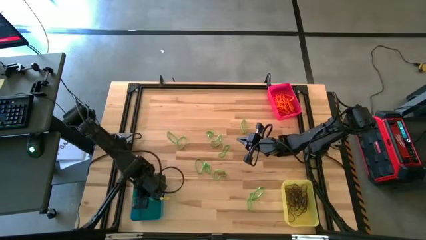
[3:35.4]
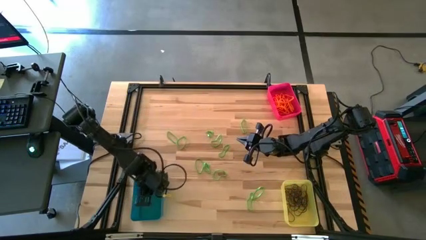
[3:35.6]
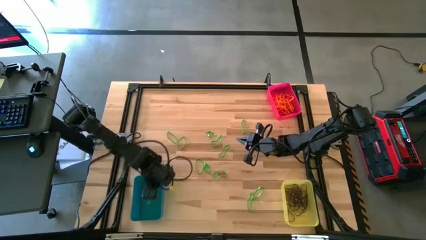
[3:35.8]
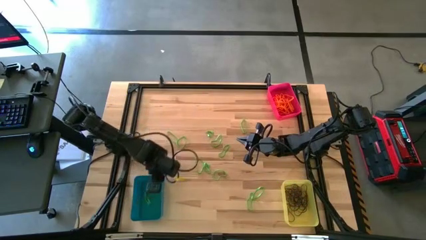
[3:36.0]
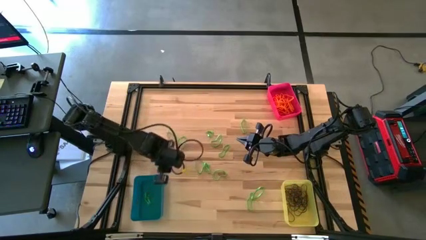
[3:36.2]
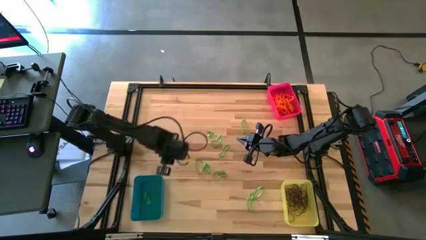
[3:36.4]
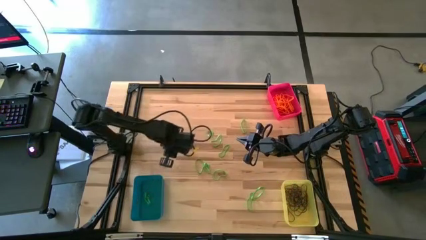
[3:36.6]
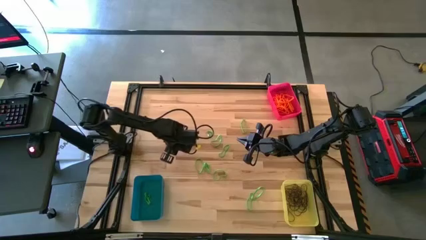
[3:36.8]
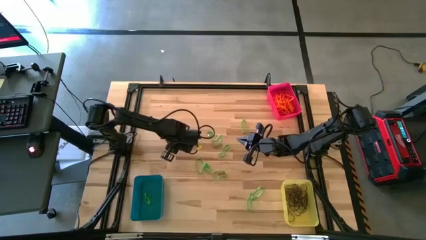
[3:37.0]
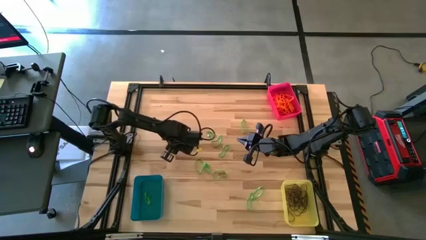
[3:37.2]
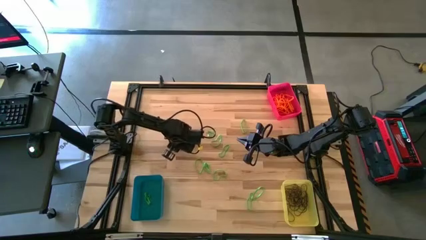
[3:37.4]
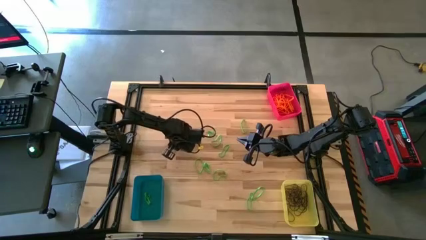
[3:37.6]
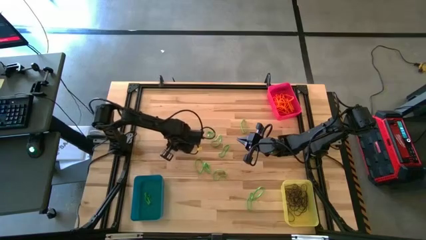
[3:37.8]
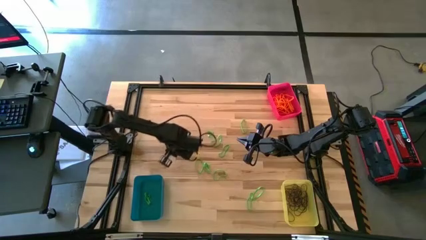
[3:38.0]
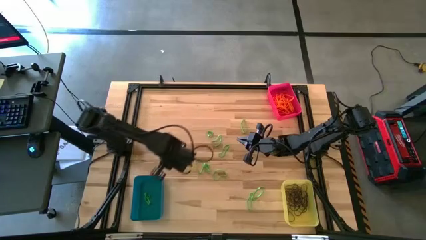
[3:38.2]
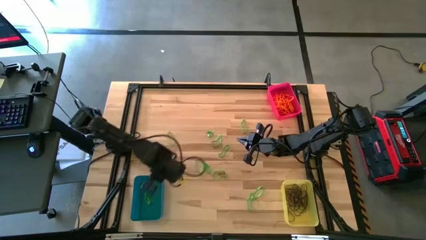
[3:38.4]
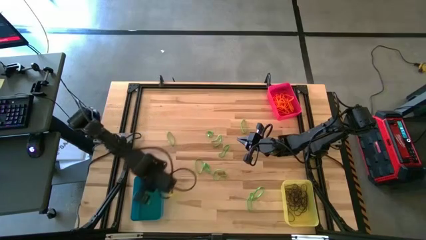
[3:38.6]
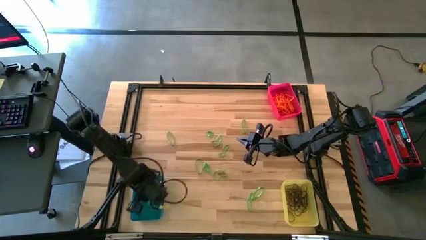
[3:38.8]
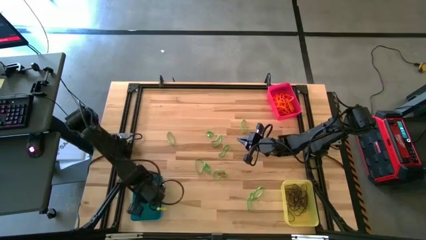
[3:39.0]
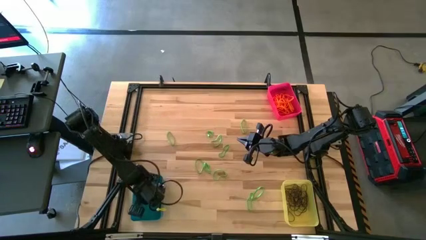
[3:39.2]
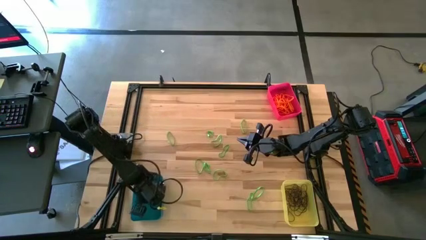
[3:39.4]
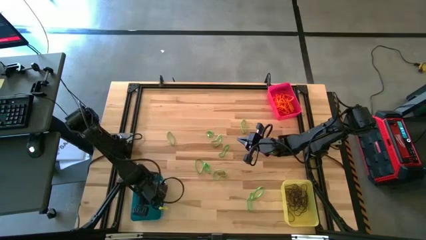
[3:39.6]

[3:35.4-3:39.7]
Task: Sort rubber bands into baskets
Put the green rubber band into the blue bin

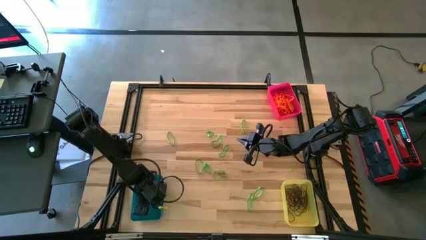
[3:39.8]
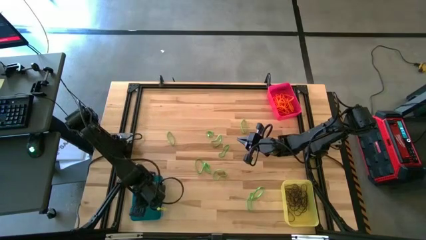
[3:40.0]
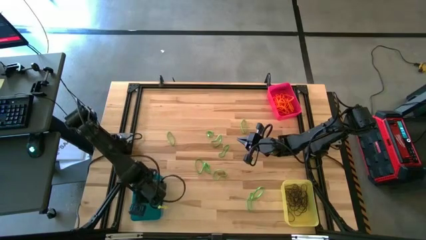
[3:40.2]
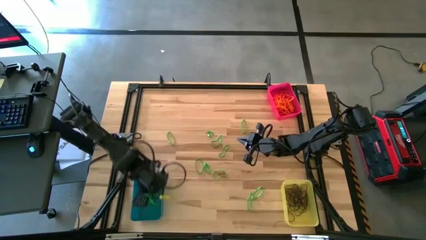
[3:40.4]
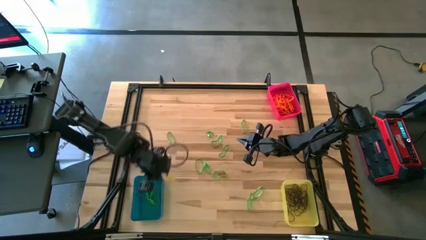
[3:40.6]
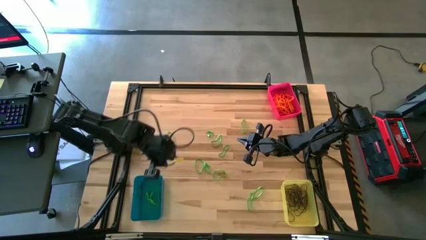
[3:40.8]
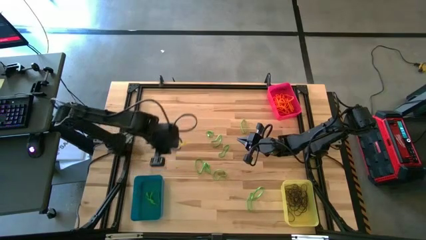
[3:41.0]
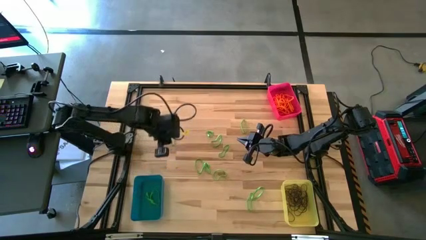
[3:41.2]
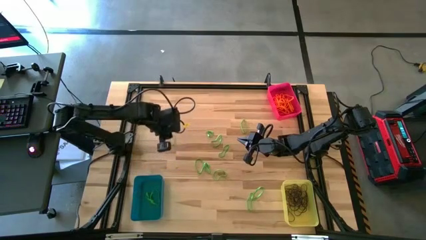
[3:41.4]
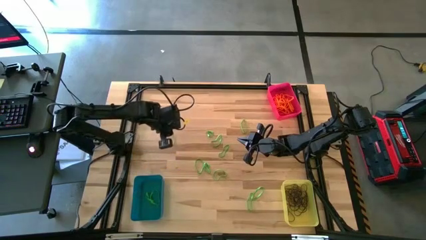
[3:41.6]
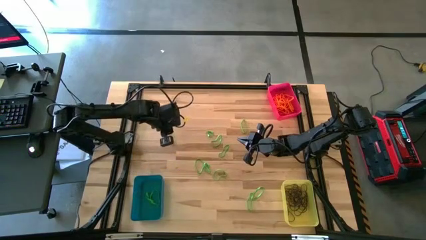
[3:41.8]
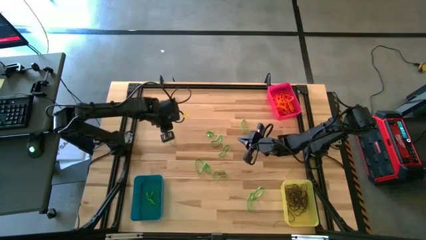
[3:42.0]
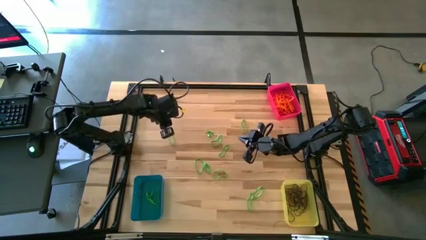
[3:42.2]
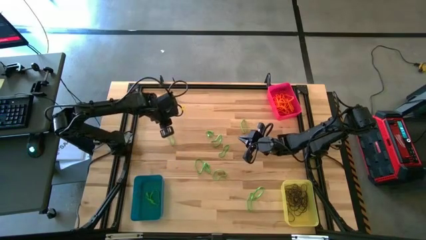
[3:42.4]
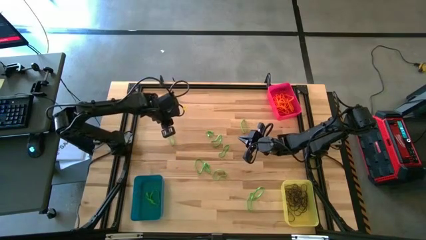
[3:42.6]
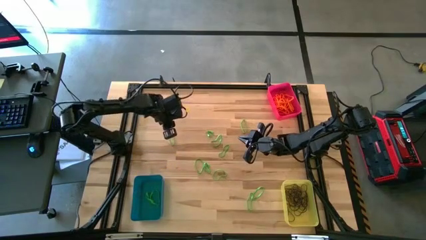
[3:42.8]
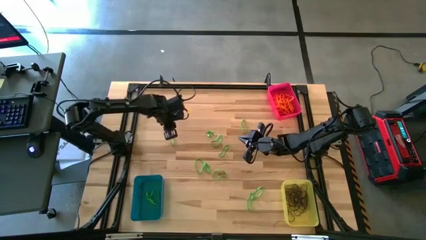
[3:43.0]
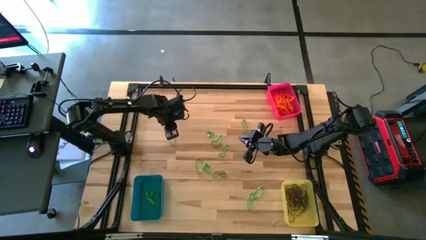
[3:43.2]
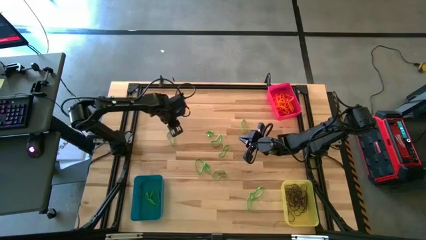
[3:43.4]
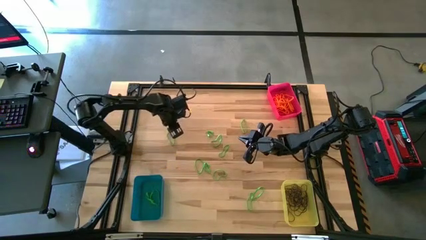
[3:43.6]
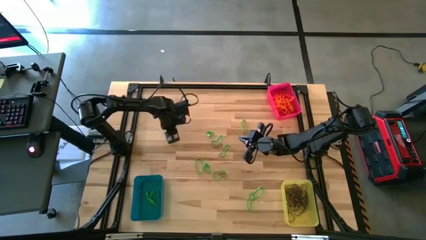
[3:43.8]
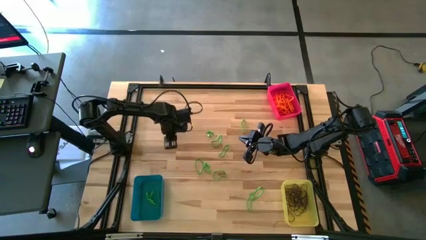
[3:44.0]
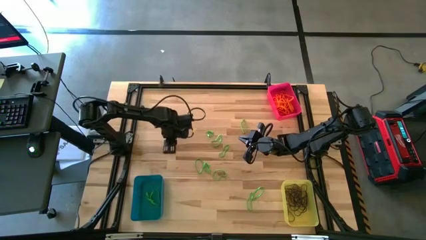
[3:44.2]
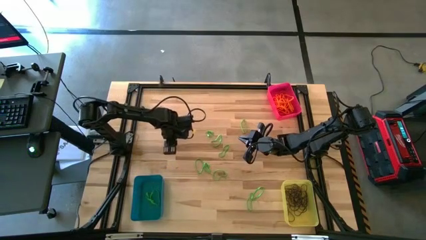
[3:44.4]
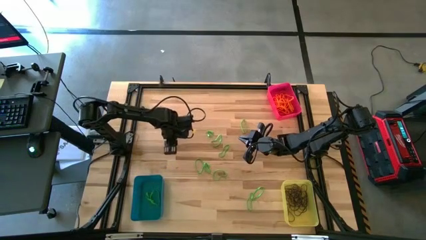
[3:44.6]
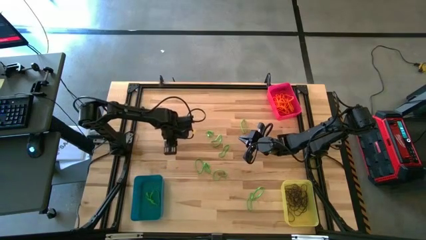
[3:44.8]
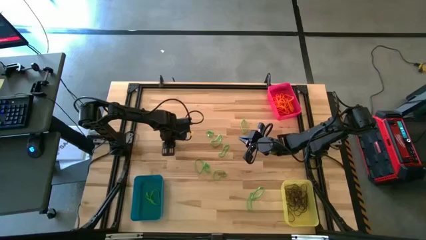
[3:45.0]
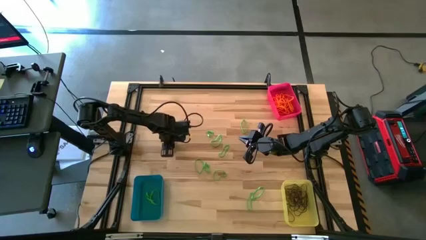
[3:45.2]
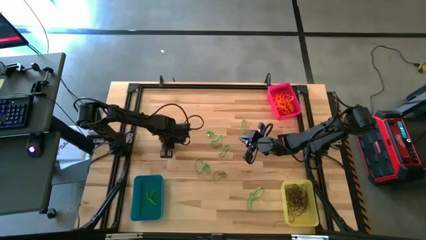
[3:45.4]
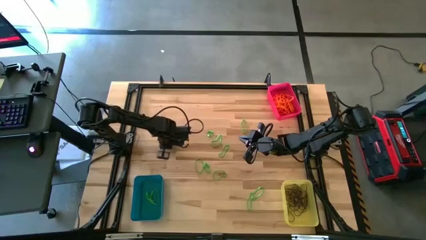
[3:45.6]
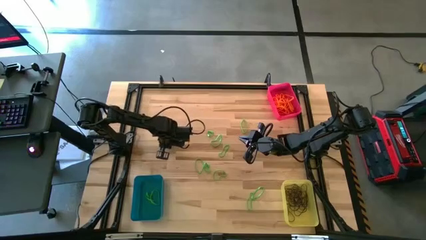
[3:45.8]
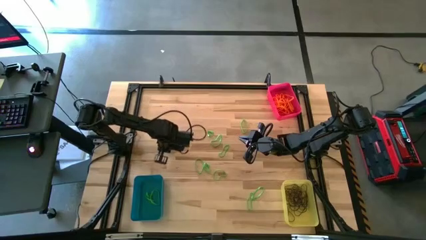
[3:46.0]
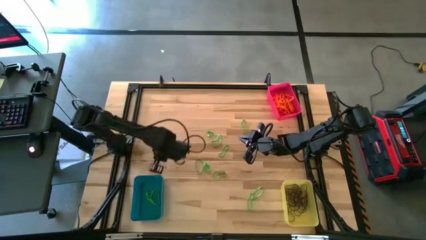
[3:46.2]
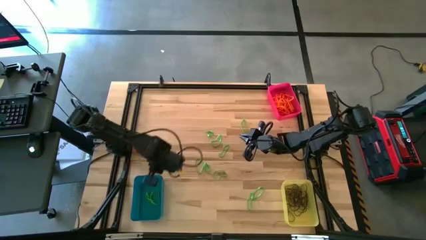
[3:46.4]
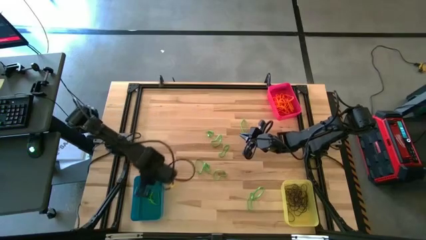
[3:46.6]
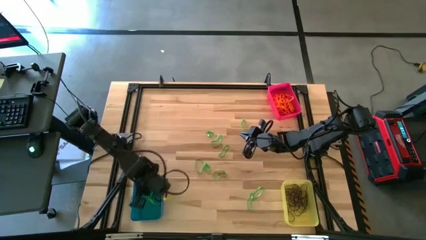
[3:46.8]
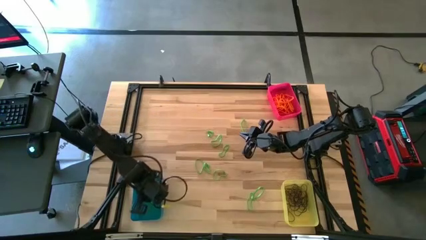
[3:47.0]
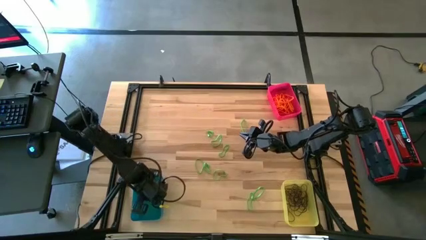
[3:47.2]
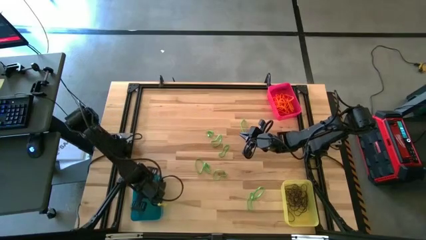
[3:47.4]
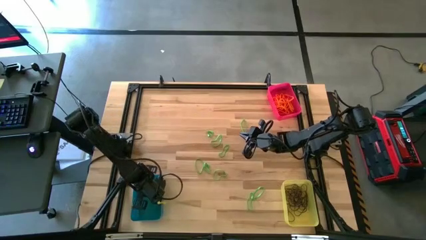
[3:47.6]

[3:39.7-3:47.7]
Put the green rubber band into the blue bin

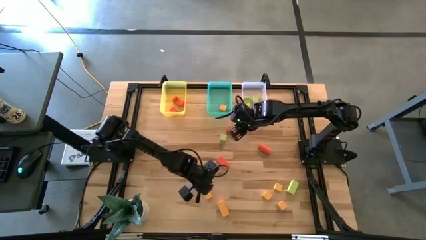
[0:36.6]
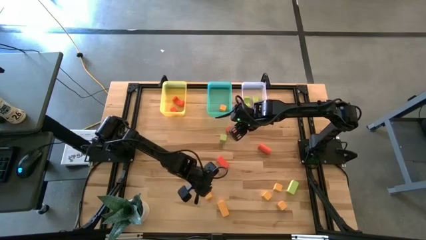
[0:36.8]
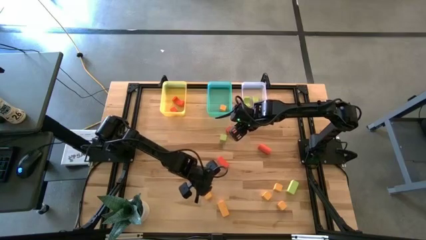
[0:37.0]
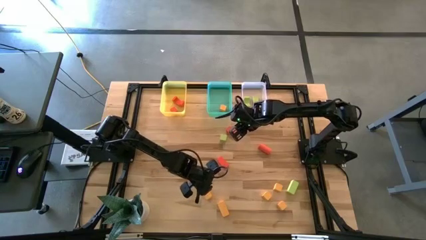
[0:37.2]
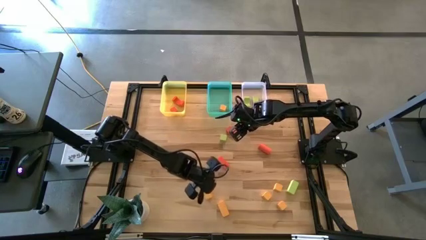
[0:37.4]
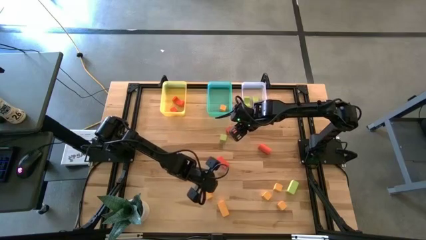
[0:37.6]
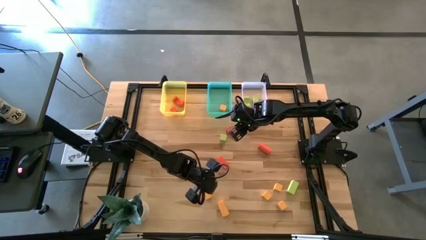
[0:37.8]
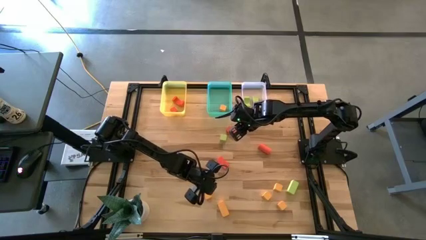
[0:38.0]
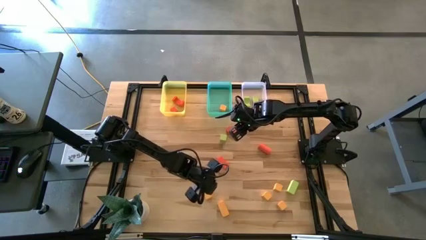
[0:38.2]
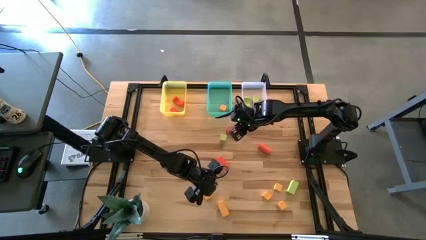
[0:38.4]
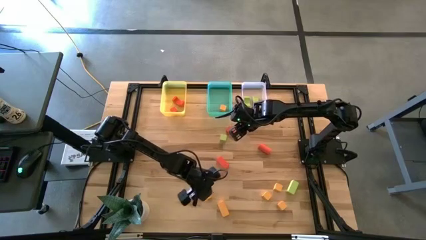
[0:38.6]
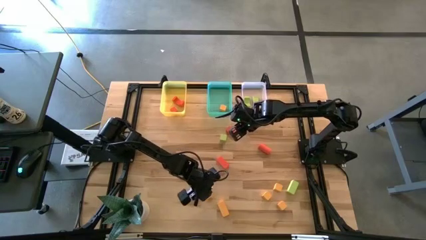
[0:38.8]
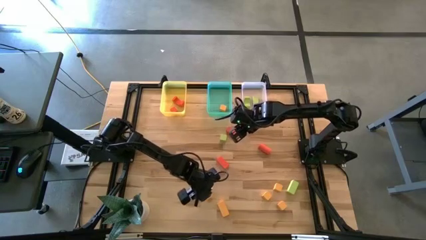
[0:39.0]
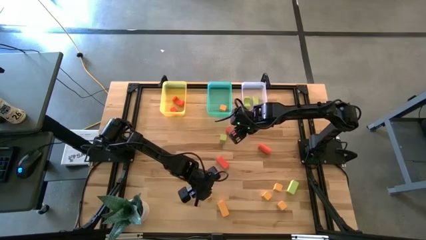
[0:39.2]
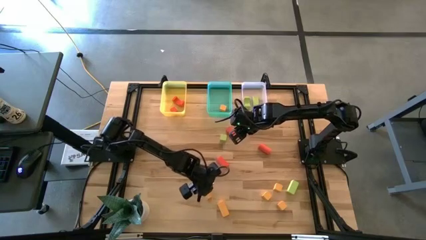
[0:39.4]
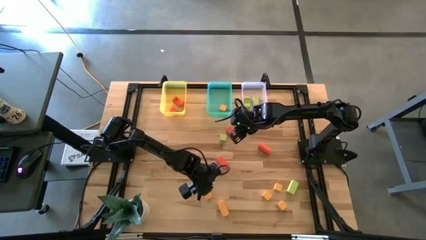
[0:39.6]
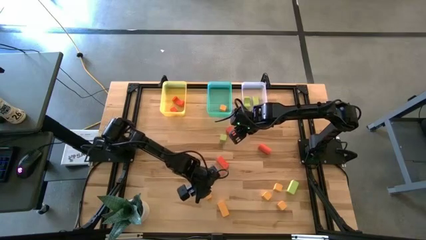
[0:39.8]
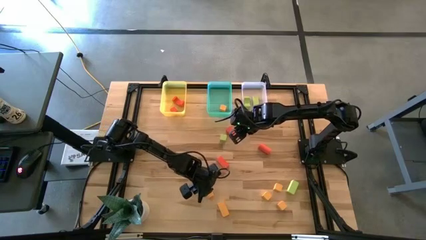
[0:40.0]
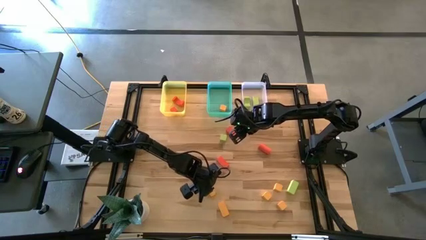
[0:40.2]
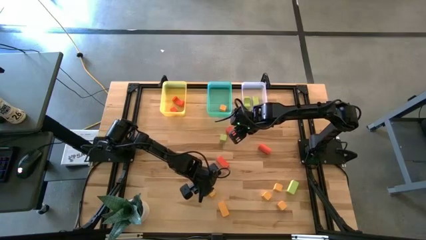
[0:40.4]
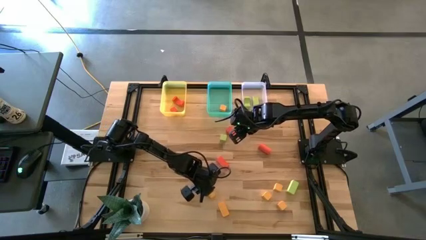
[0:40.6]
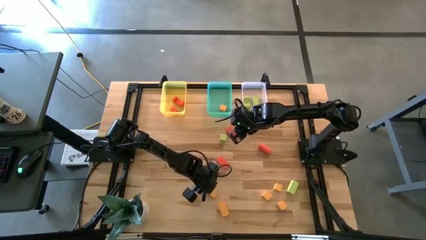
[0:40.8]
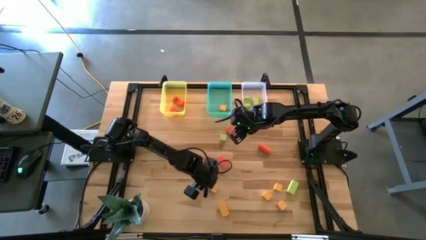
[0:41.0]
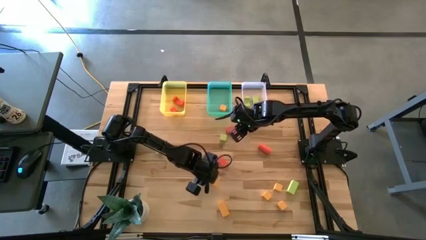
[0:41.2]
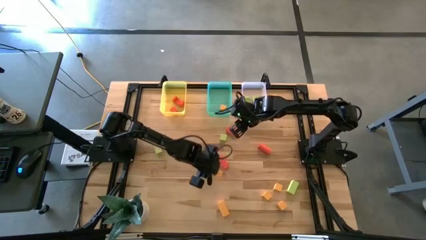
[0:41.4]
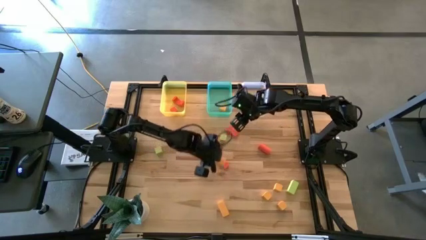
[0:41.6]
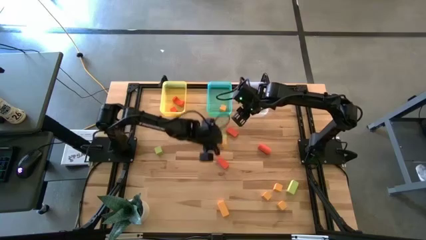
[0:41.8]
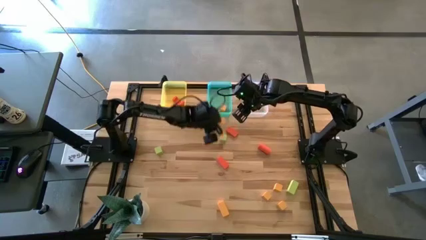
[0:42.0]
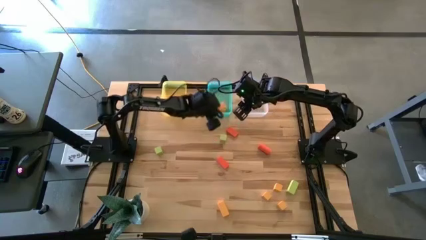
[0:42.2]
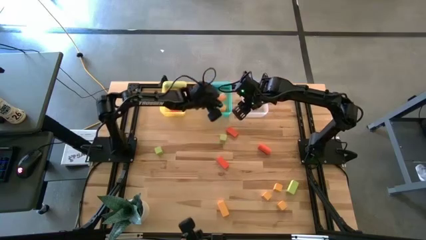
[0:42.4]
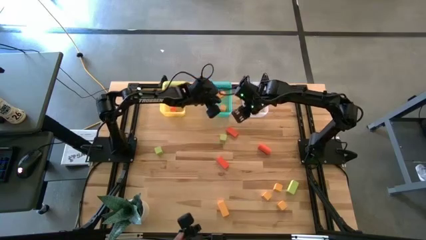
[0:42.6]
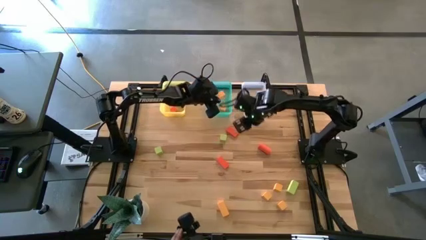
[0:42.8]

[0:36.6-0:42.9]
Task: Sort & place blocks by color
Put the yellow block into the green bin
